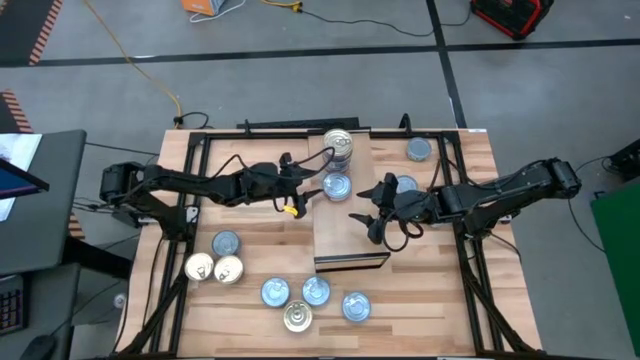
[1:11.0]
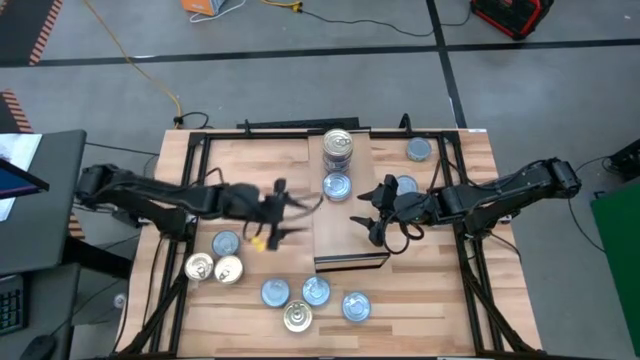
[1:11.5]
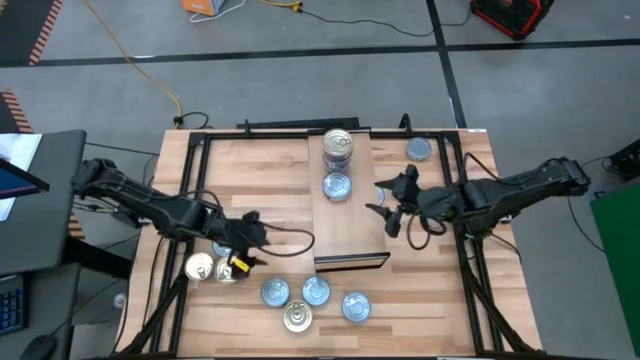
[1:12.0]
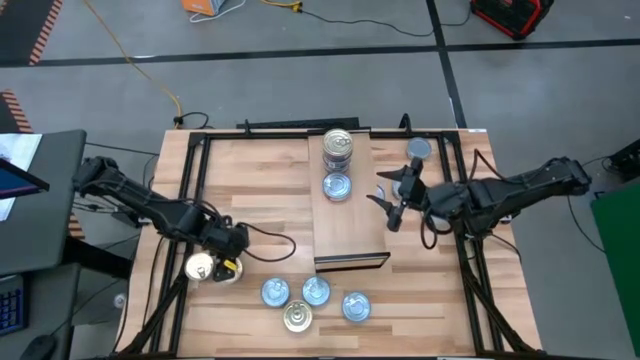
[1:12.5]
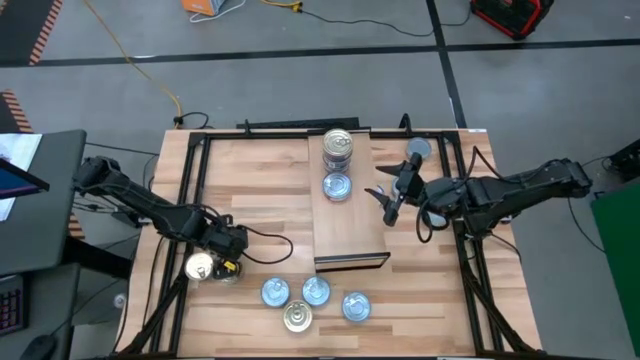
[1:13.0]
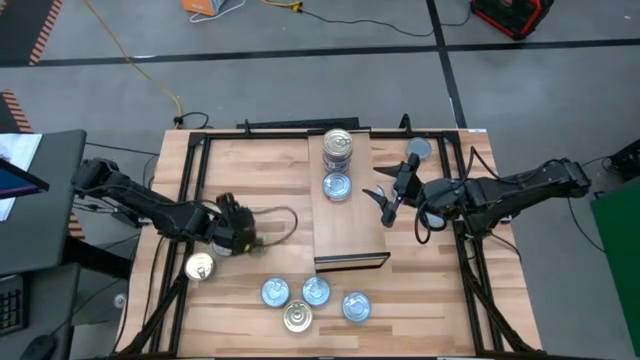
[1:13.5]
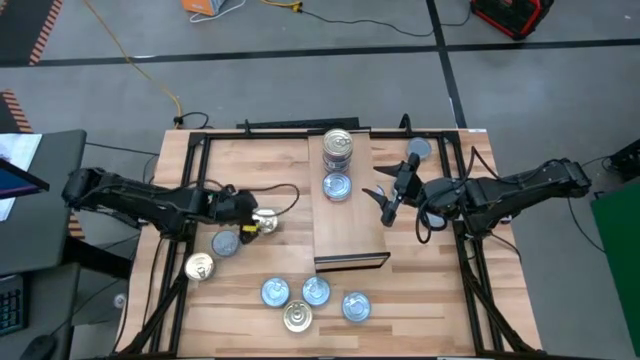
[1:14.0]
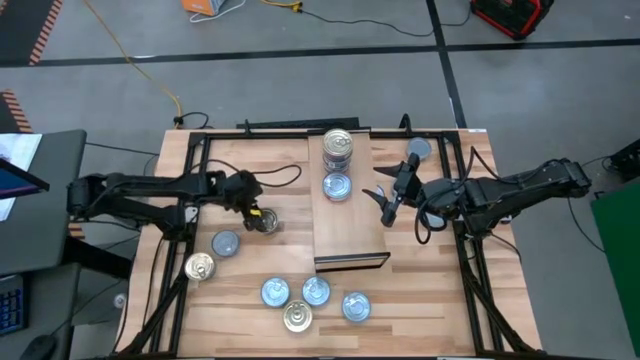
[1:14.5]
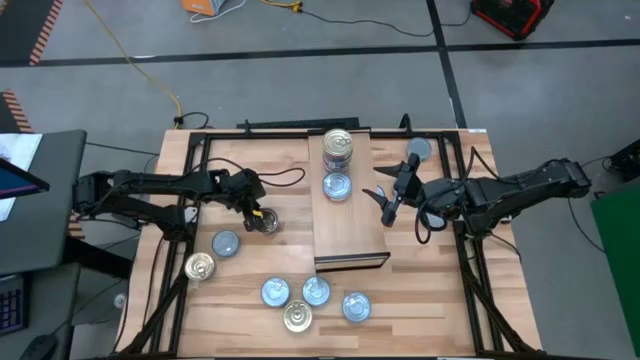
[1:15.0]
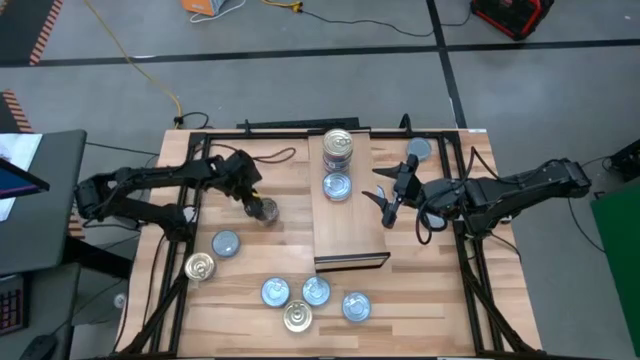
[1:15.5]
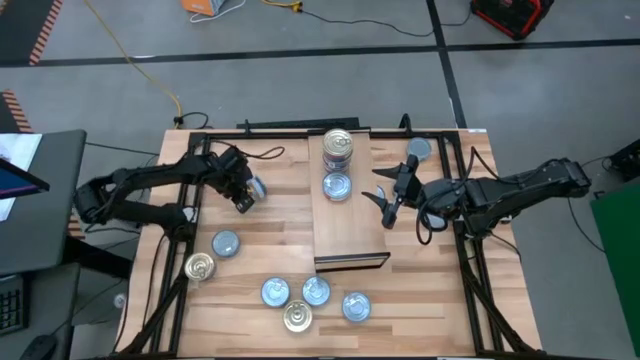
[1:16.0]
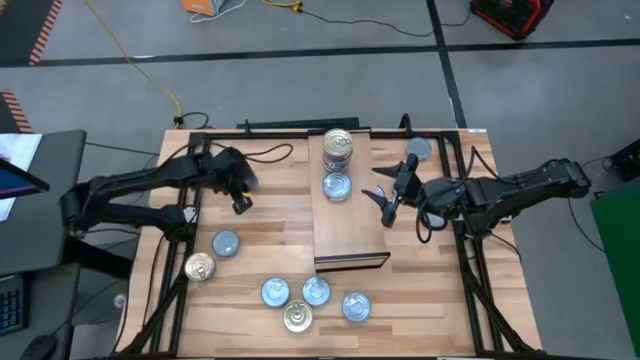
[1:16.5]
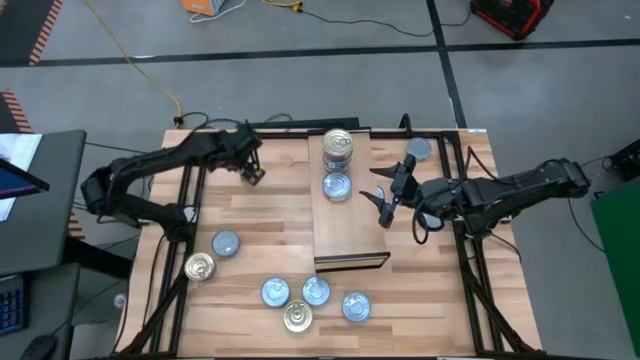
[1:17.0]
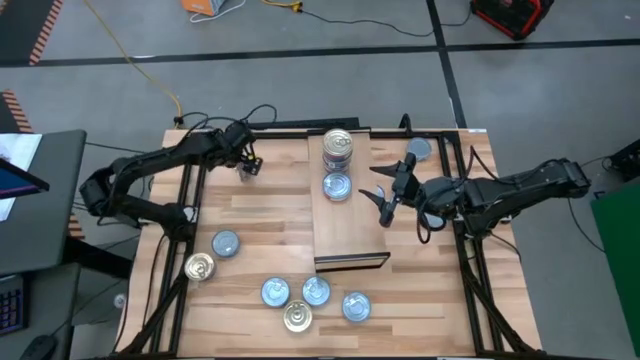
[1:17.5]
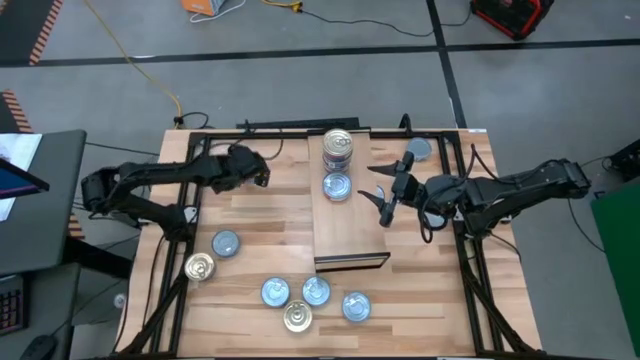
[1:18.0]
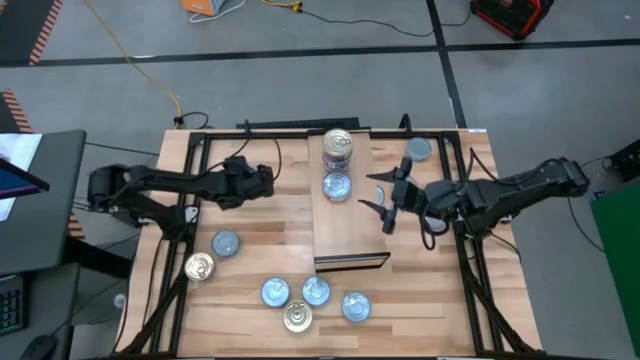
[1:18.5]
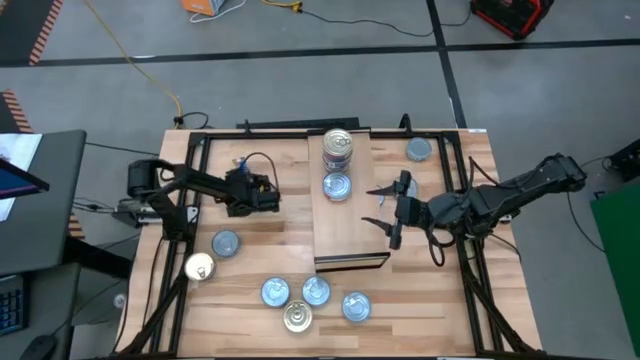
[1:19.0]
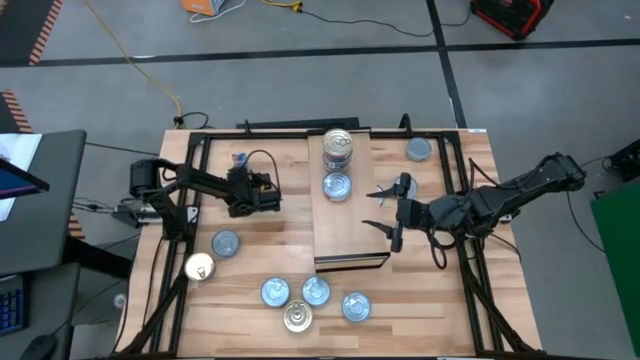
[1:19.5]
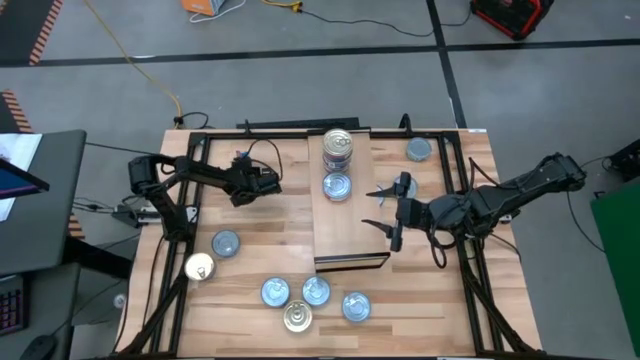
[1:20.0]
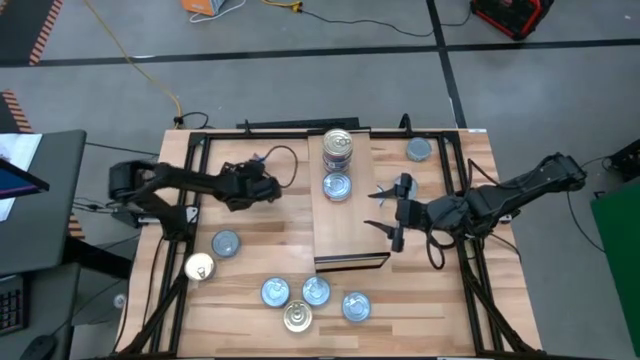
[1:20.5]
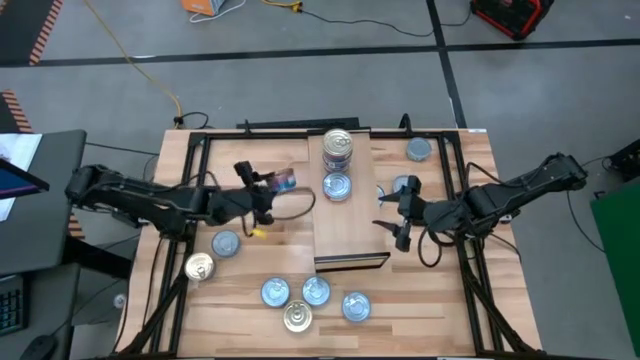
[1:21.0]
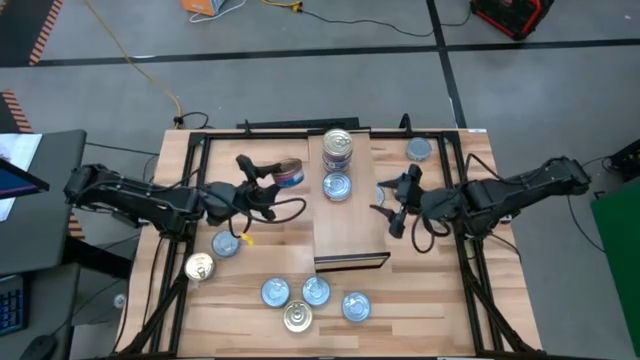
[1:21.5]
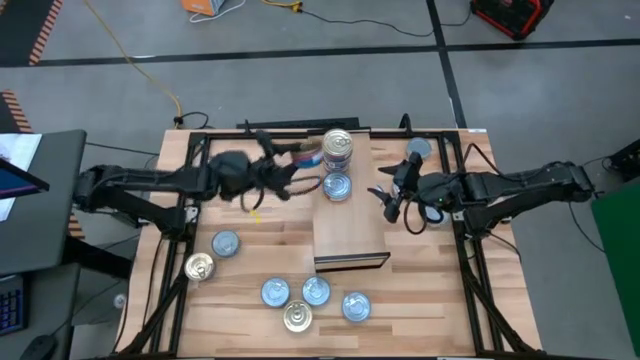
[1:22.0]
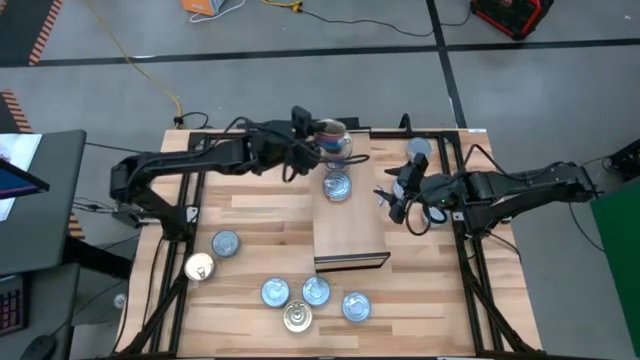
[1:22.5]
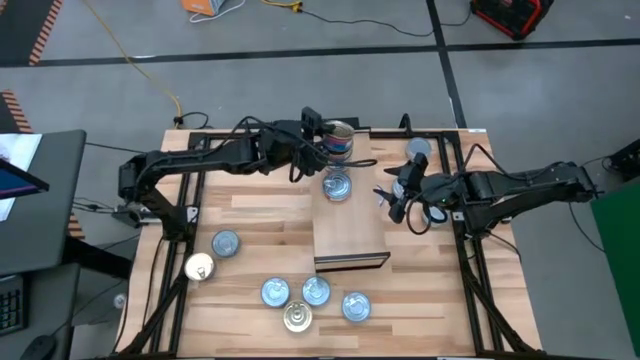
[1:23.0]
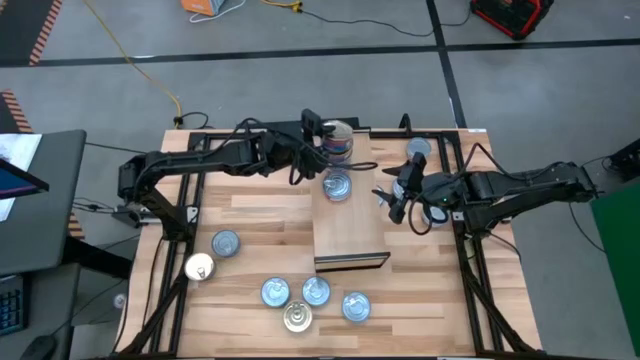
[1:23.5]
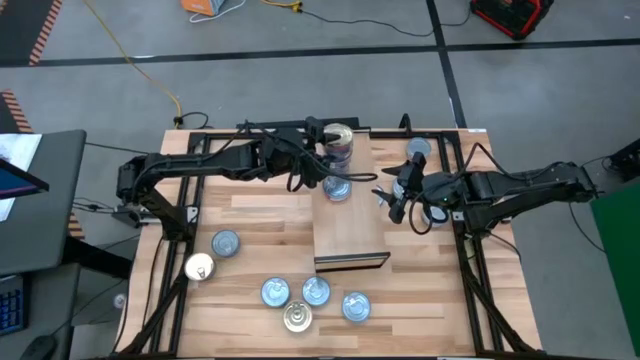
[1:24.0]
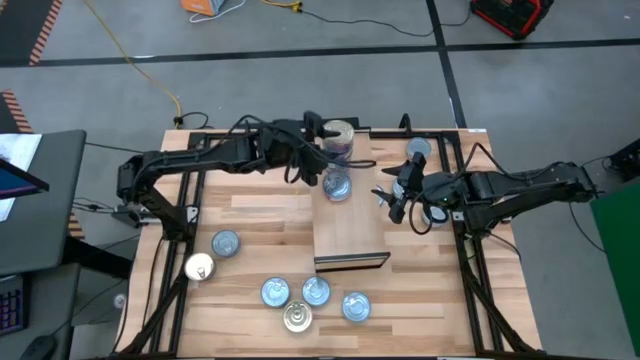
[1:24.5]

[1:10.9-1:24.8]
Task: Stack canned seafood by type on shelf
Stack the blue and pink tuna can on the shelf on top of the other blue and pink tuna can

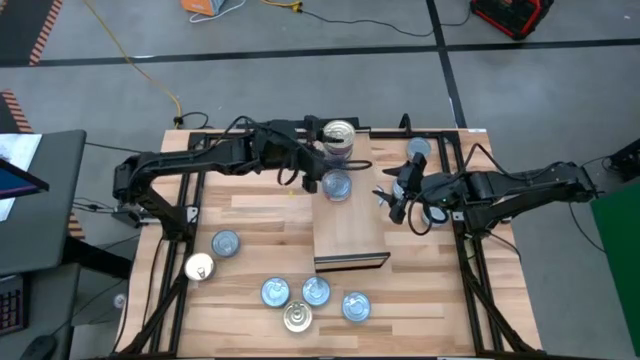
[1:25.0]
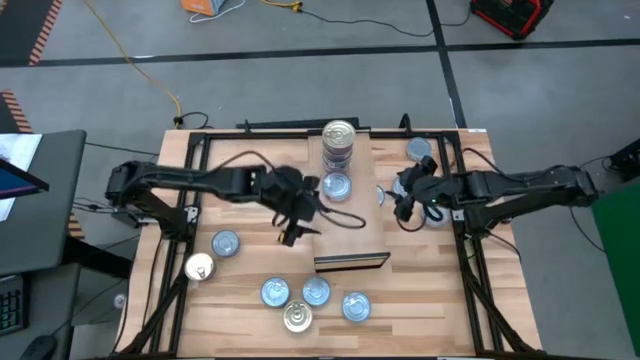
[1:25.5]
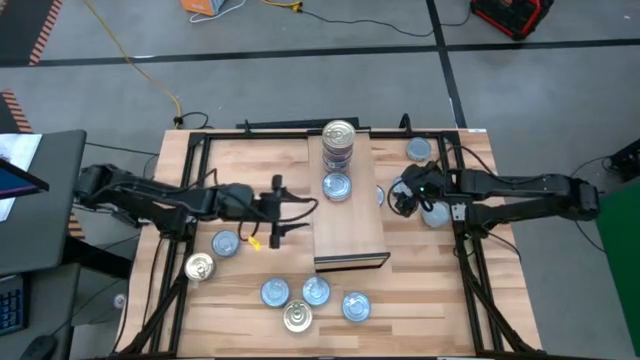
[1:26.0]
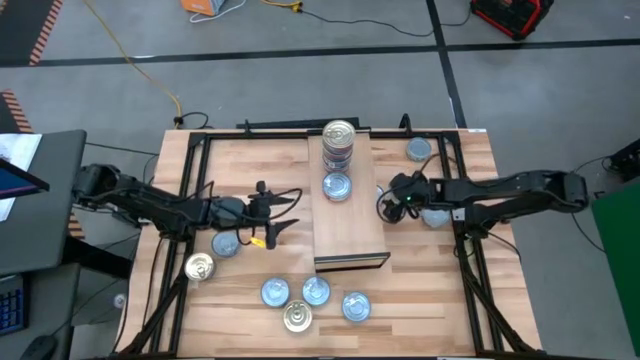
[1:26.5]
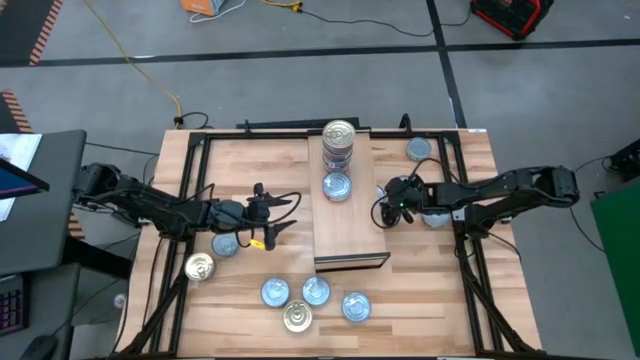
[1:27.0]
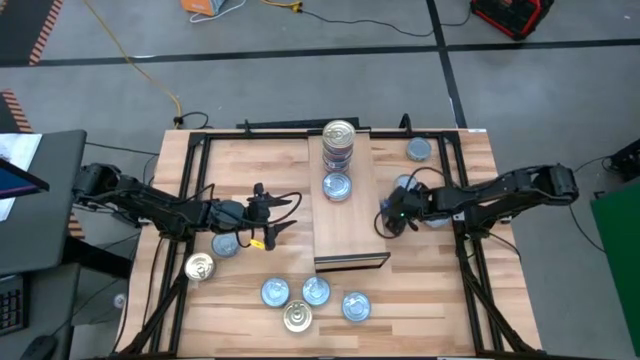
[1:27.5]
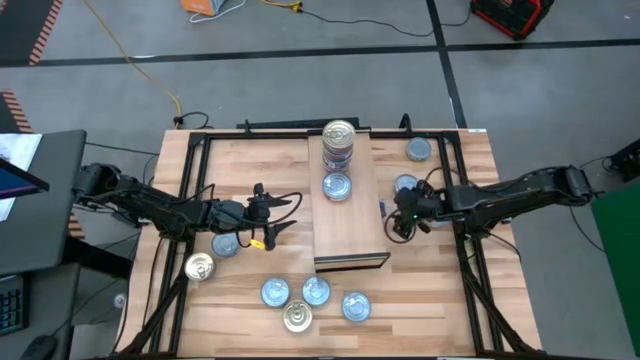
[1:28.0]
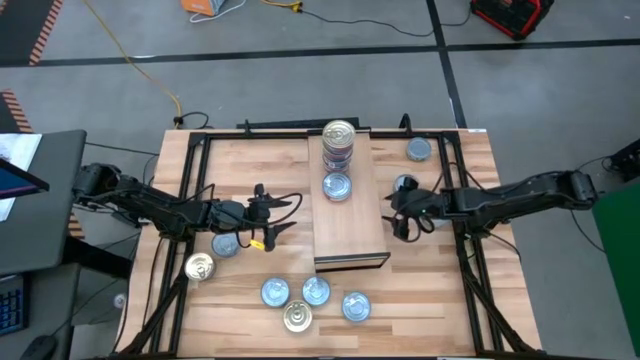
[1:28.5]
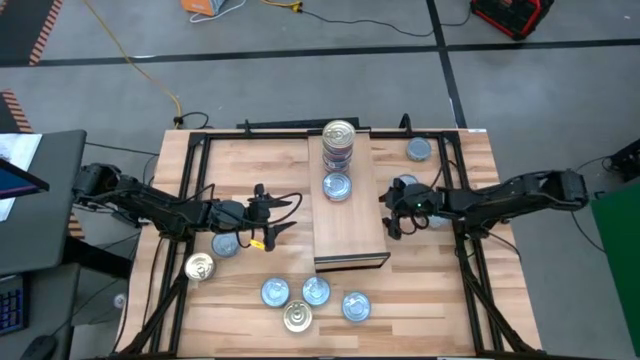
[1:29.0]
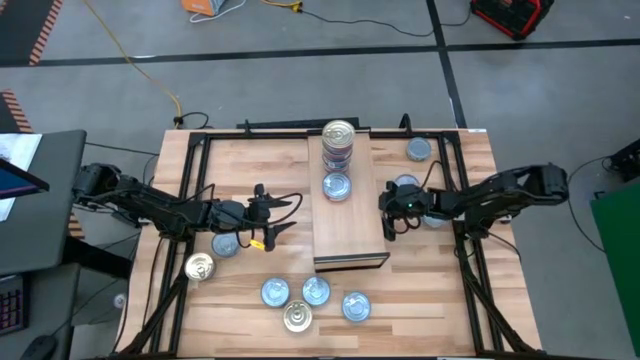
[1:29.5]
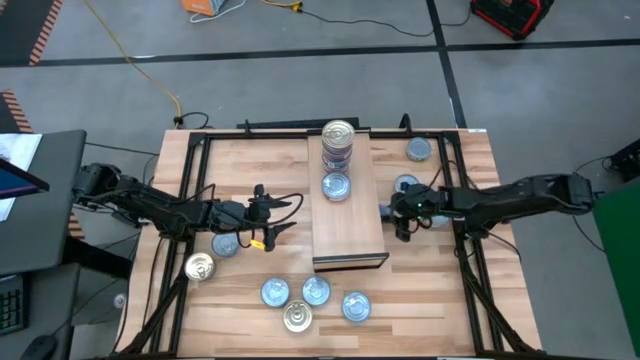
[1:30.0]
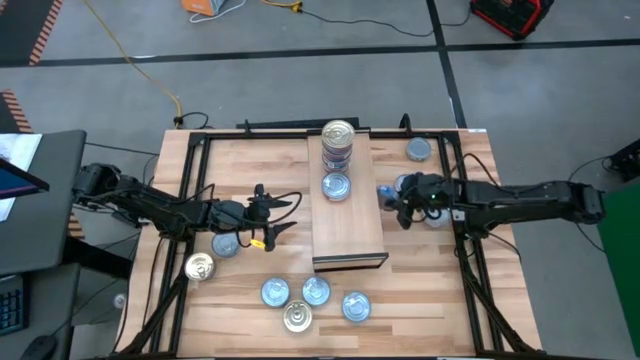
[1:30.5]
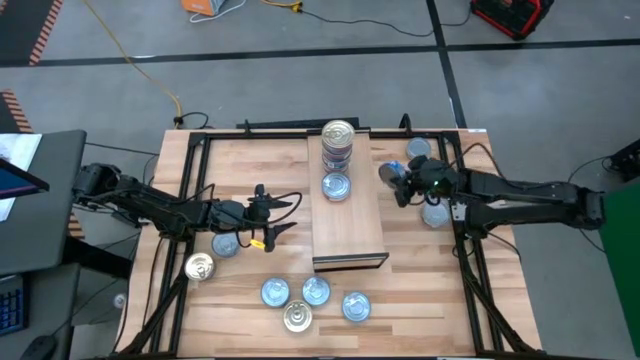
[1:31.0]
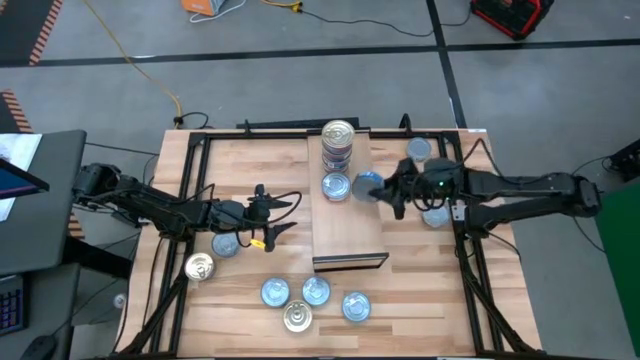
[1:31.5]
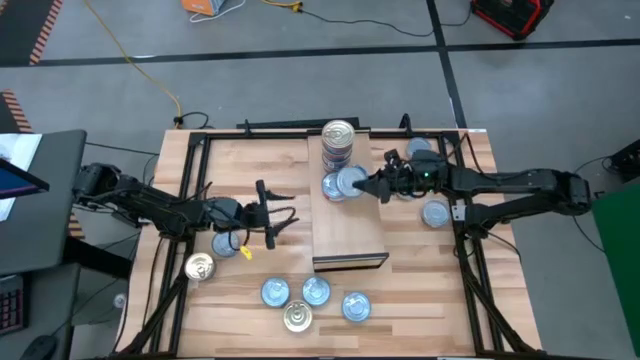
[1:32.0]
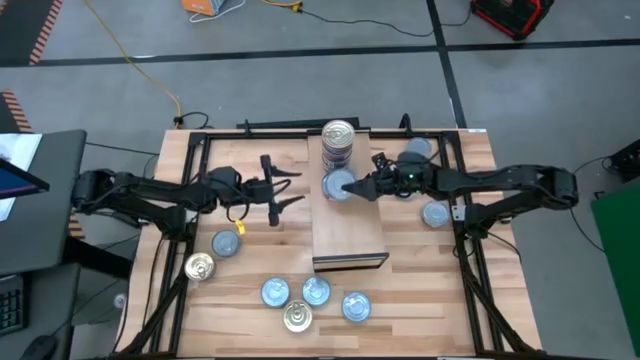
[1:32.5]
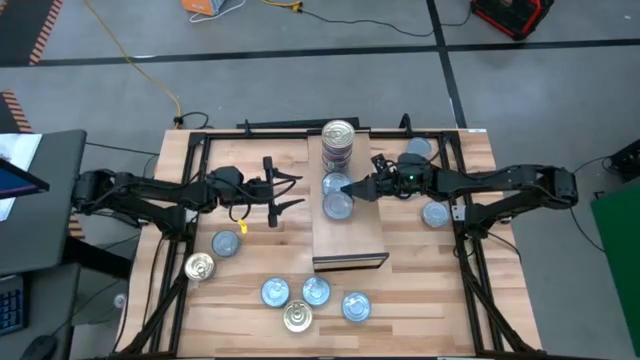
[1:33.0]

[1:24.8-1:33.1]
Stack the blue tuna can on the shelf on top of the red tuna can
